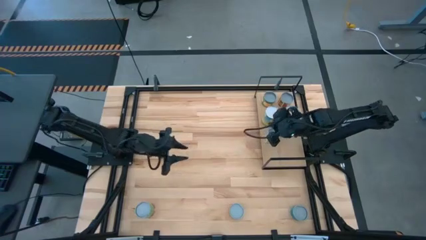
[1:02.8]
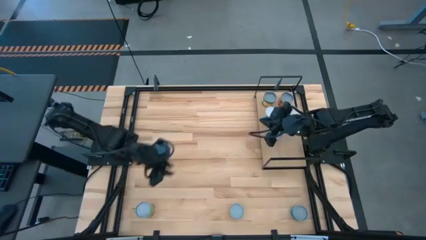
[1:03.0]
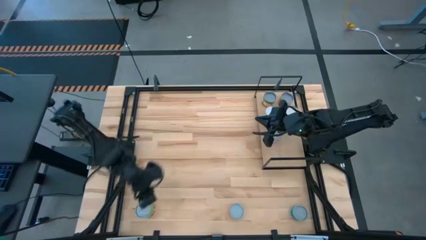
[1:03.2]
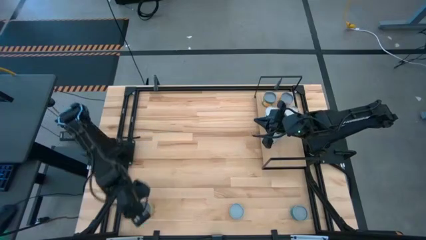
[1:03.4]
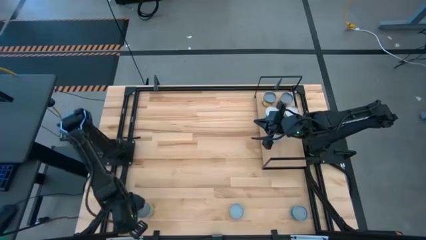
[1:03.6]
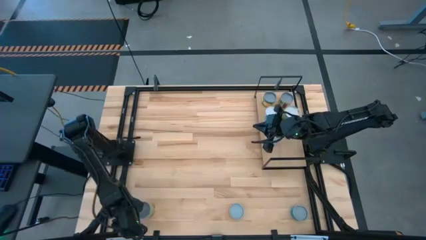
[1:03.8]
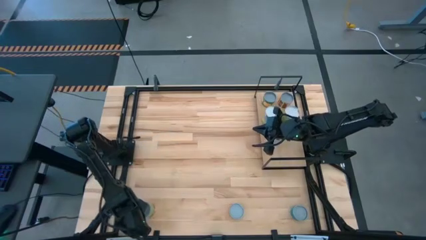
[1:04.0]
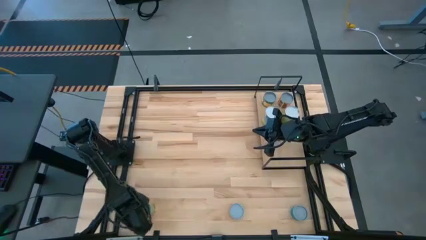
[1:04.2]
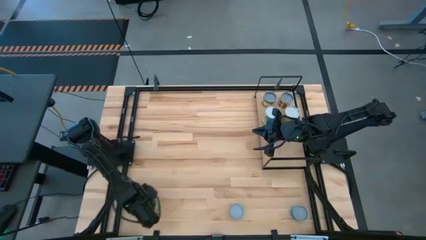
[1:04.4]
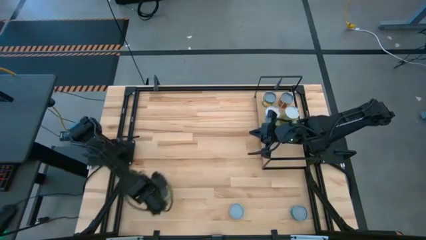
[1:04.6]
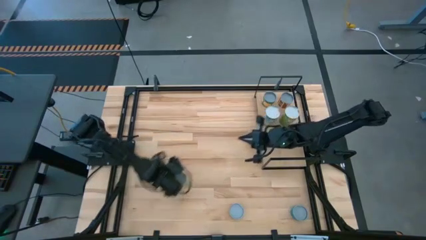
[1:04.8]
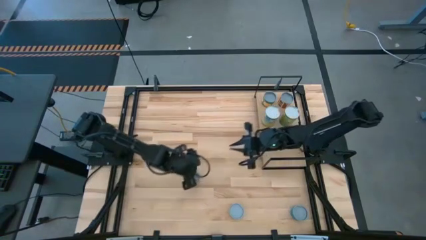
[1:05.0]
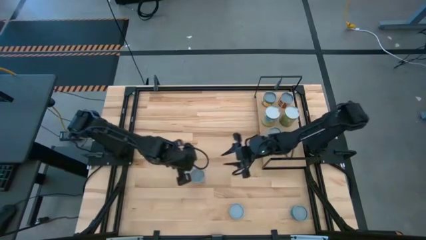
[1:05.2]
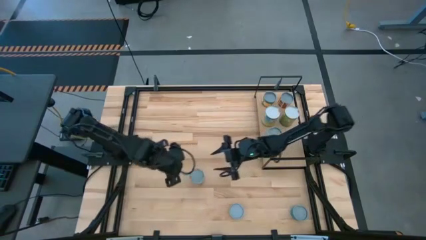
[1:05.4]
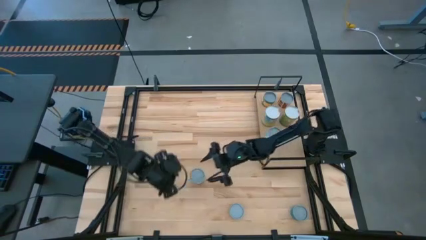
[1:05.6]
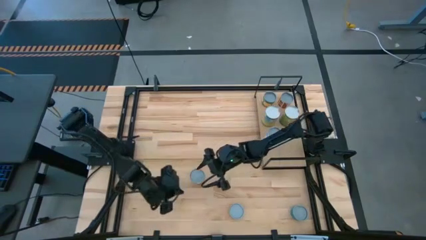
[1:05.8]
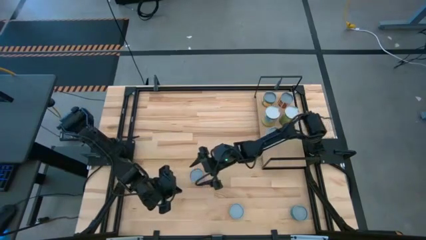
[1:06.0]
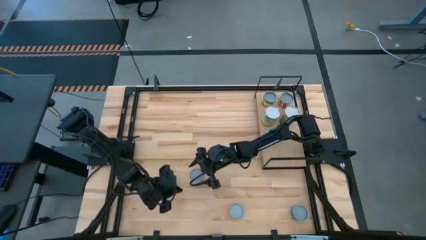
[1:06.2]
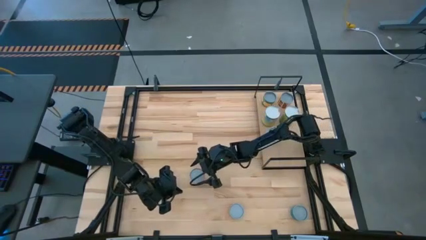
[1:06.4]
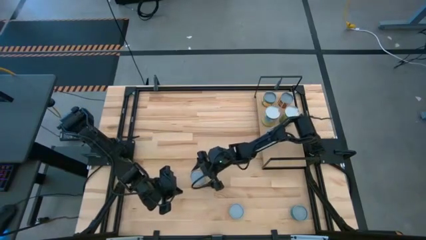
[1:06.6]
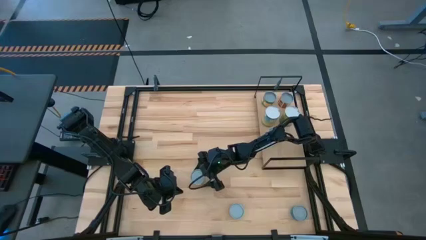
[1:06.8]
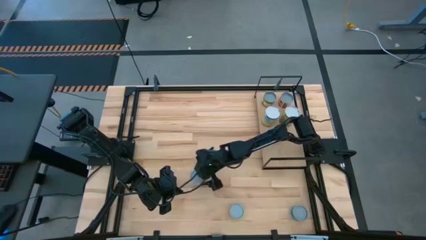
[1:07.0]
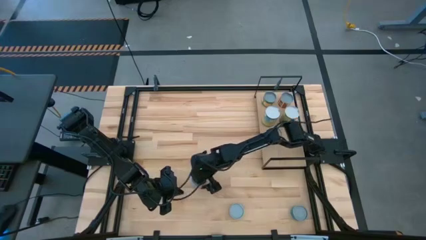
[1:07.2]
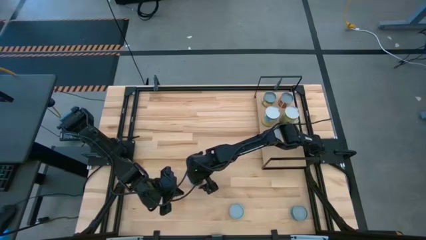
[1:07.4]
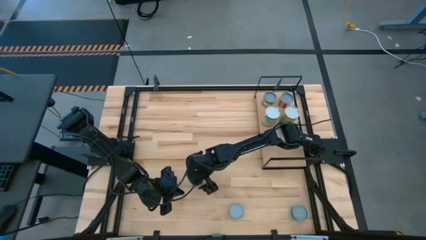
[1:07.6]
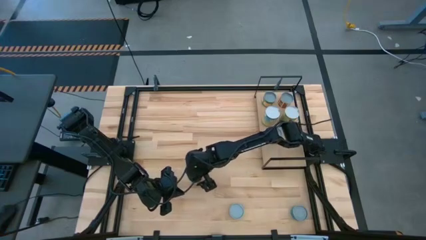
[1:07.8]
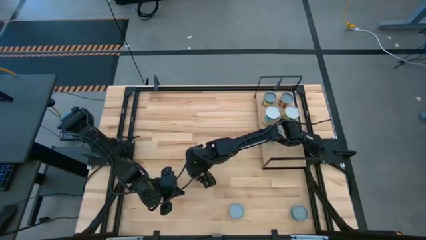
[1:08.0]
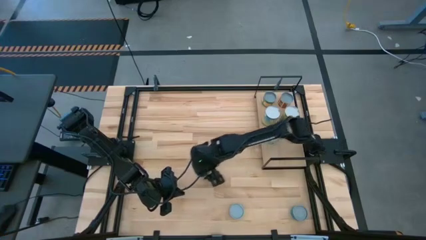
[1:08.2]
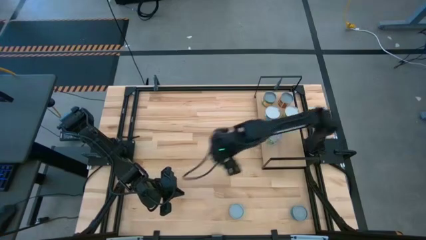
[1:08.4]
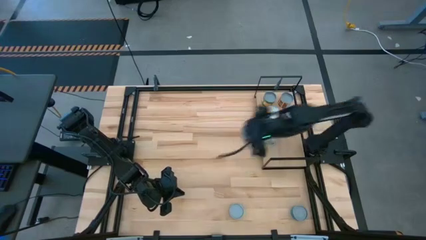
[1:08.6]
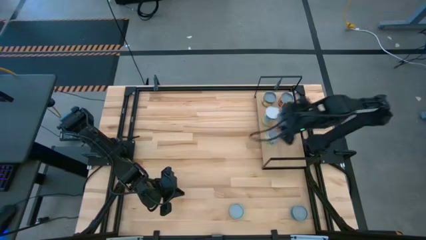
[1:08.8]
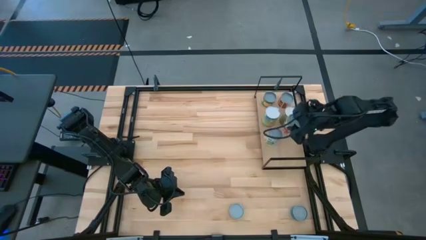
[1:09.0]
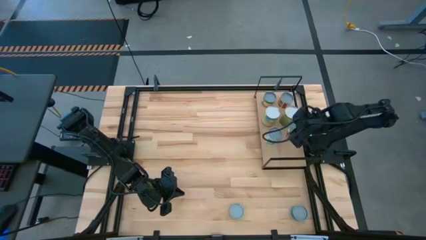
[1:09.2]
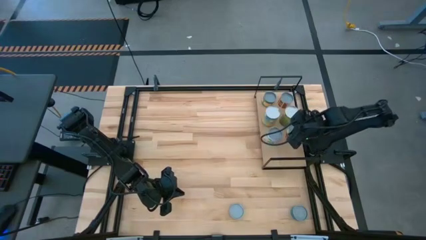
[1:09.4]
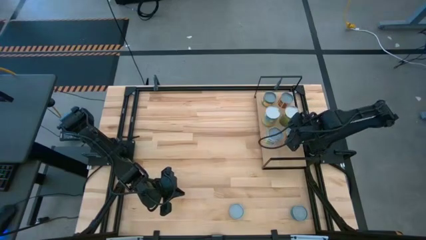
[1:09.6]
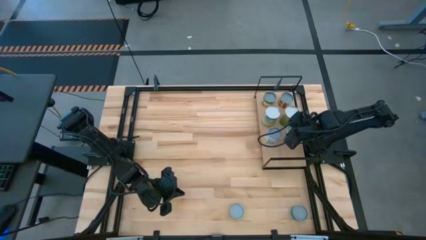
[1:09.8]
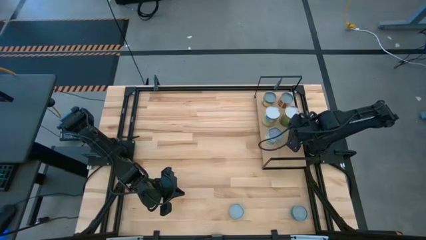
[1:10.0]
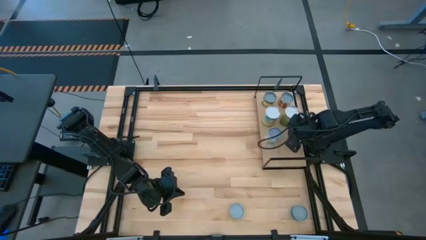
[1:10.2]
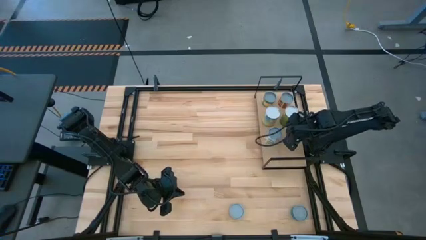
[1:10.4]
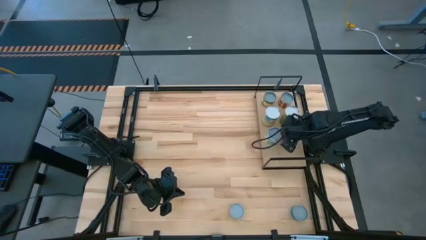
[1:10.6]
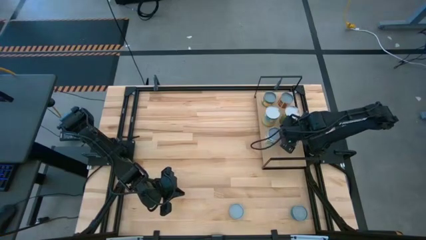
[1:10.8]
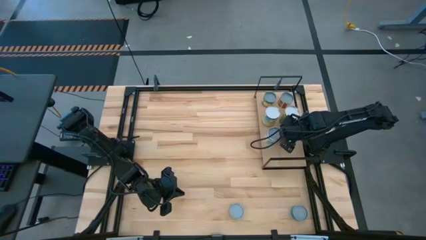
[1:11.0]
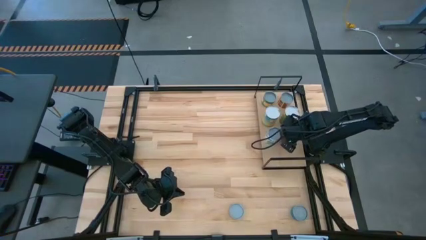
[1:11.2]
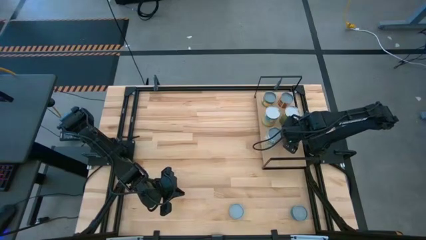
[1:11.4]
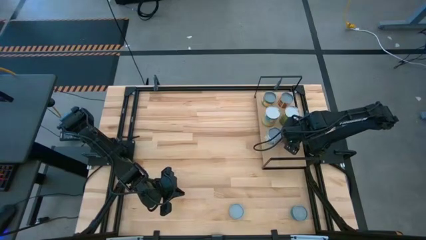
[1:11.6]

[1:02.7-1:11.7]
Task: Pick and place cans onto a shelf
Put the canned spaghetti sauce on the shelf

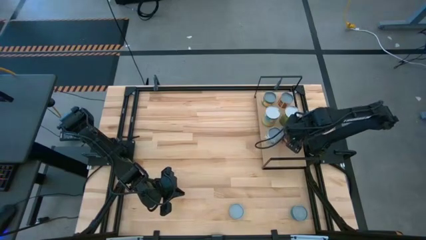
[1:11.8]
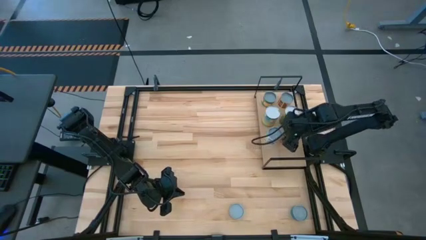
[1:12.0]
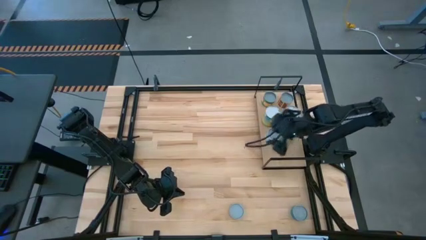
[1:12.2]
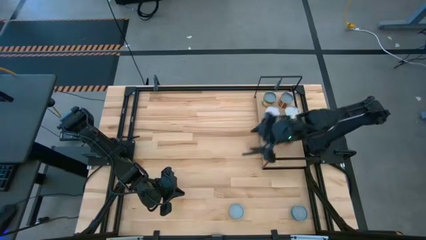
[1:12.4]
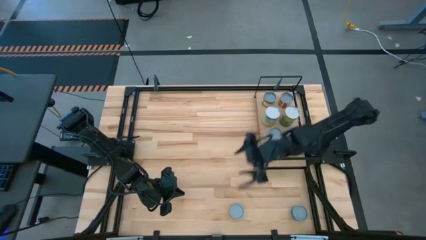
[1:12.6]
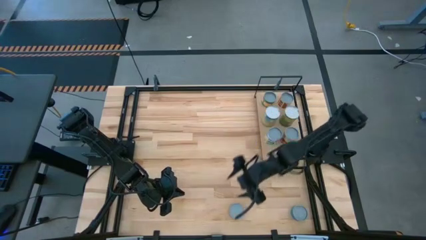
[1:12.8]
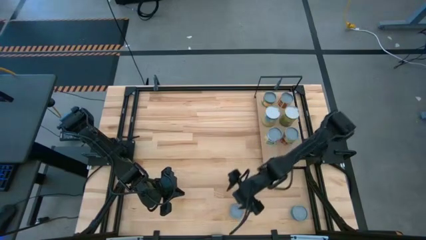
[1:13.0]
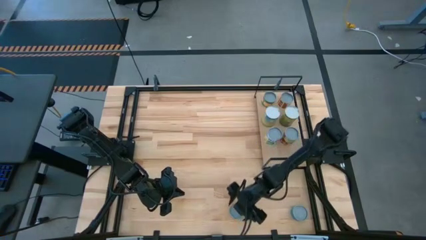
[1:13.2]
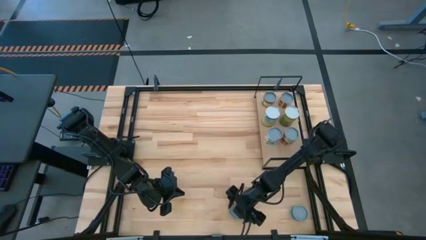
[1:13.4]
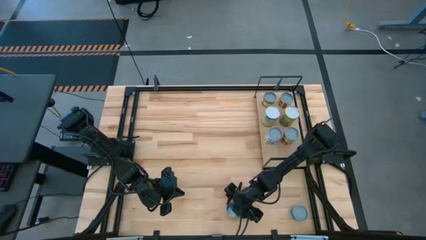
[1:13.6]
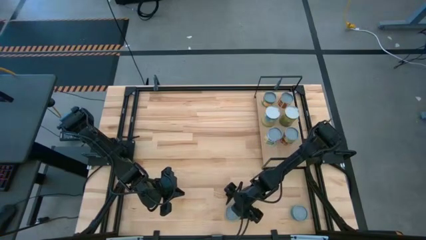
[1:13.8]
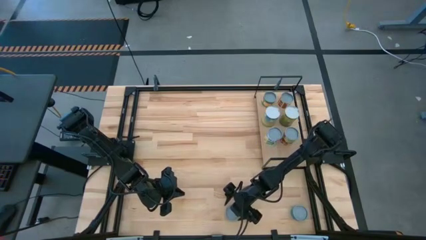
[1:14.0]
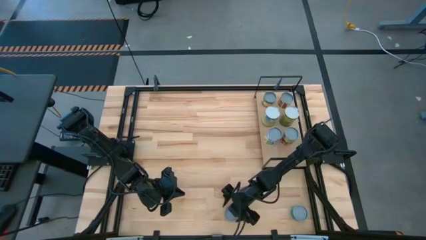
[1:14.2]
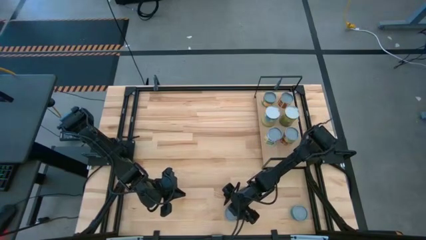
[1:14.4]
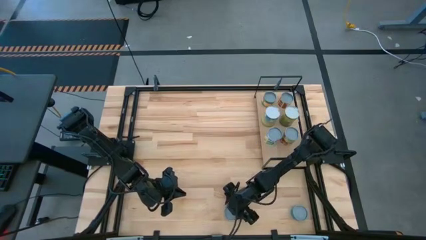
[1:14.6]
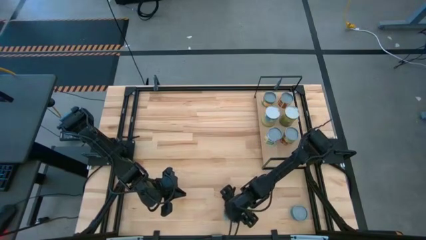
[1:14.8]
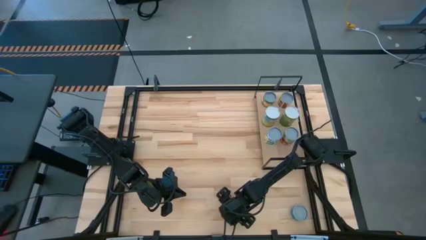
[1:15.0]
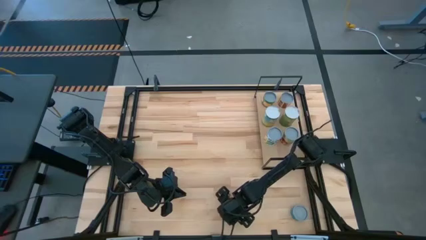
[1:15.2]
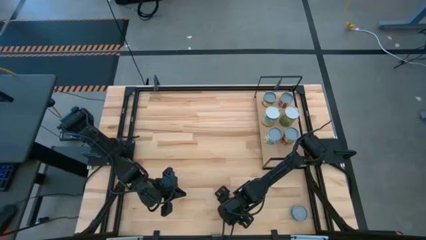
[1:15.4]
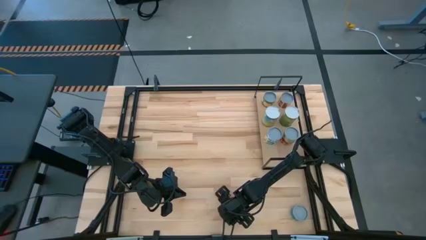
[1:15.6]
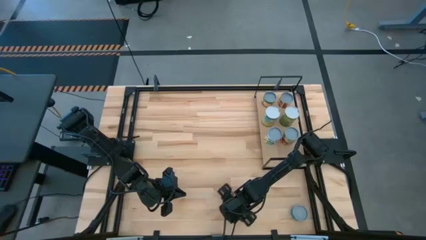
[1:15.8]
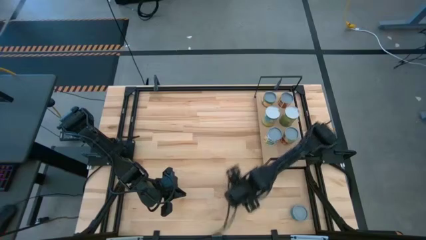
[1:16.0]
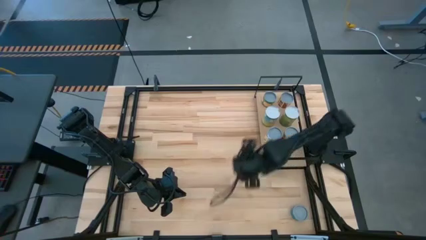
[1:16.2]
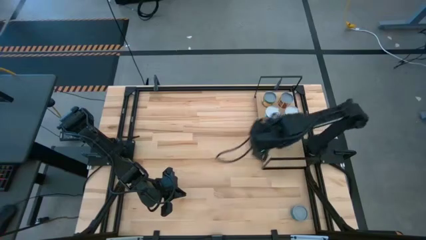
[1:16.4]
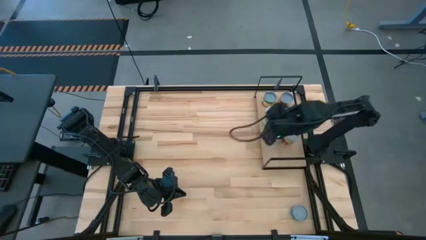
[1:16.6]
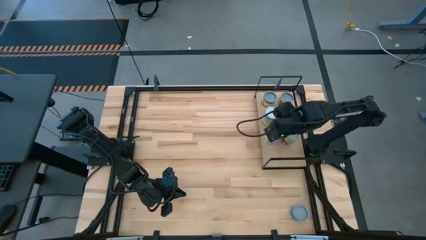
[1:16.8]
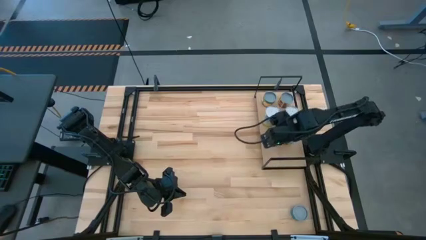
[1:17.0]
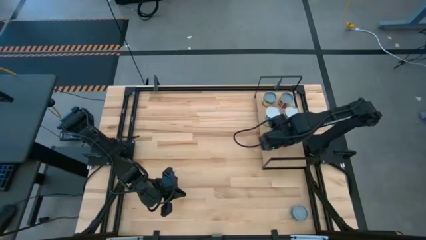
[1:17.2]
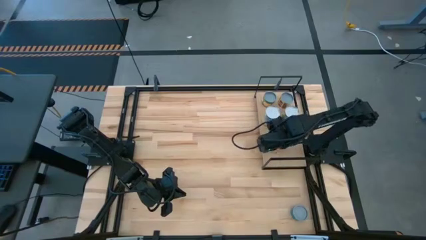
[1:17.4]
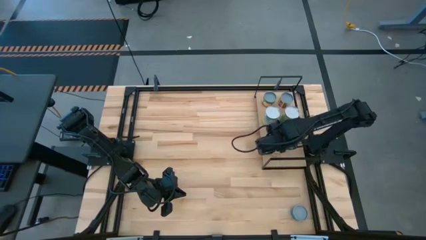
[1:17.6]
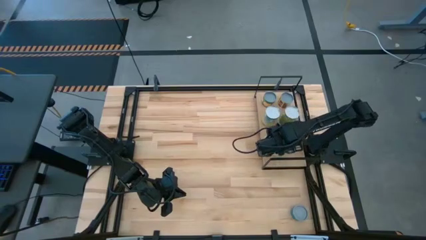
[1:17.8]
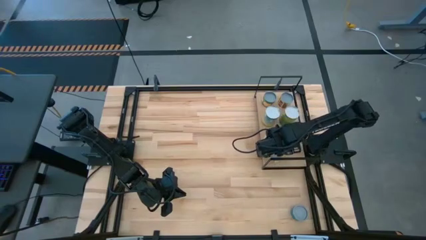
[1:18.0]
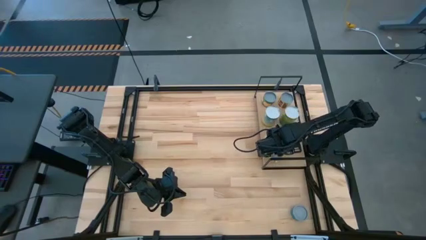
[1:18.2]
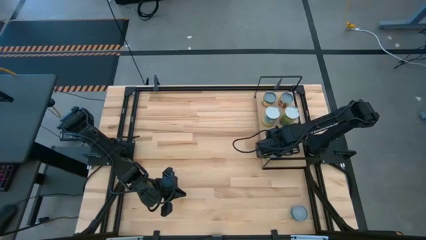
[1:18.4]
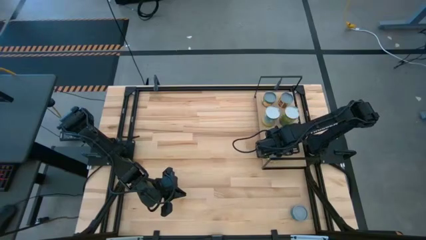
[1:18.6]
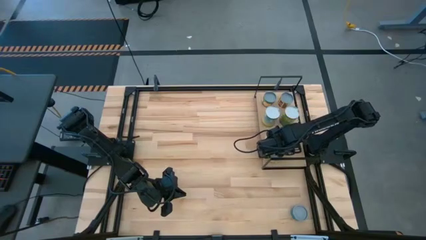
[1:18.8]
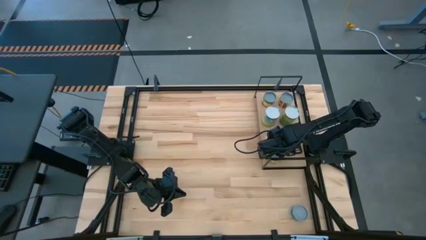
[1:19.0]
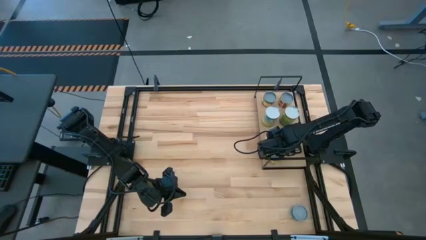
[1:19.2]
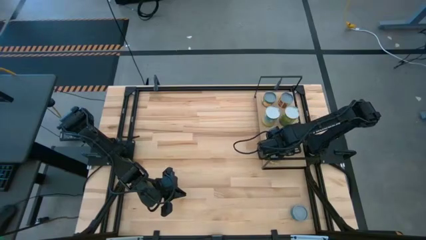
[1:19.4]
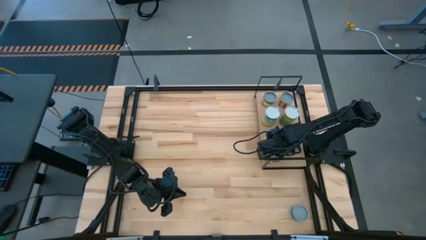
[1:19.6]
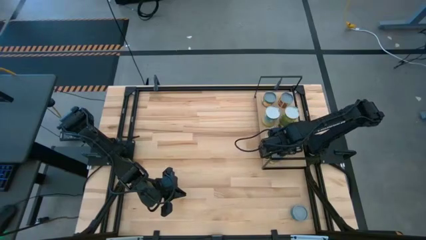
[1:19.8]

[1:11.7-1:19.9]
Put the canned mushrooms on the shelf
